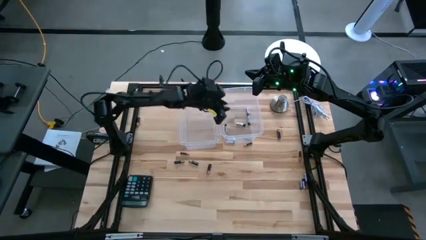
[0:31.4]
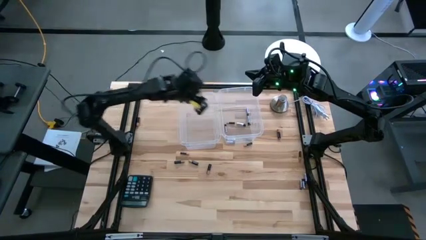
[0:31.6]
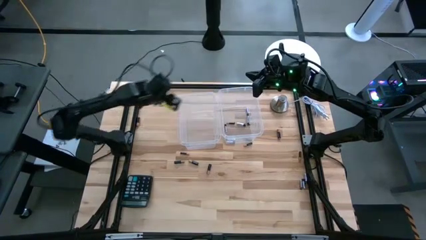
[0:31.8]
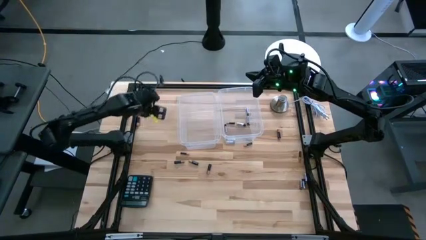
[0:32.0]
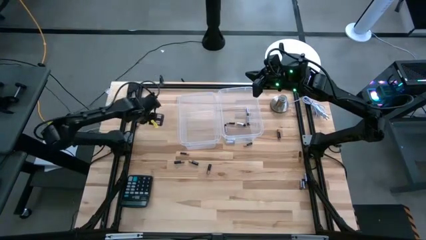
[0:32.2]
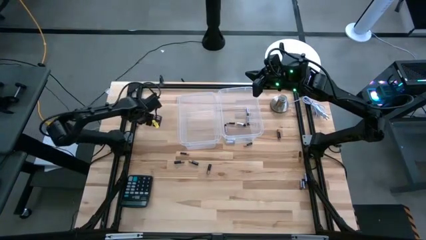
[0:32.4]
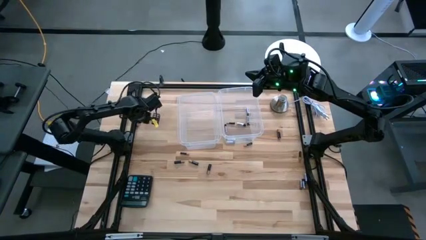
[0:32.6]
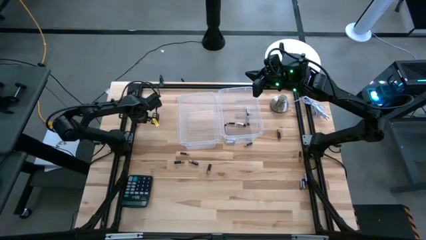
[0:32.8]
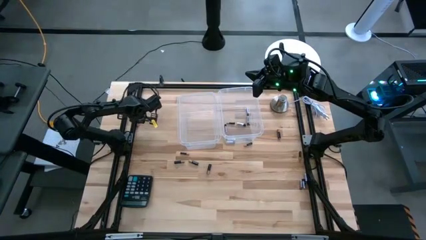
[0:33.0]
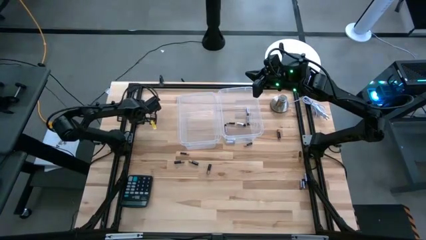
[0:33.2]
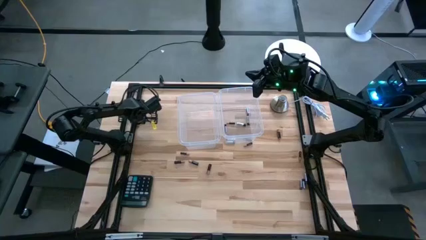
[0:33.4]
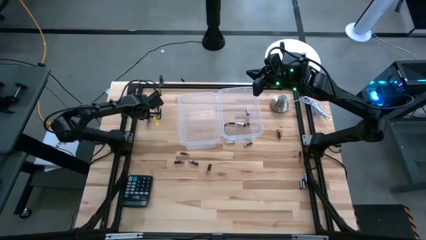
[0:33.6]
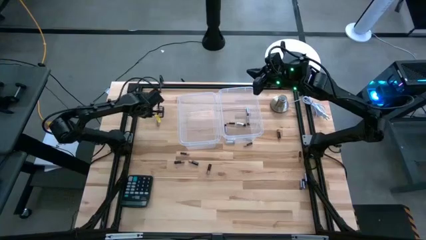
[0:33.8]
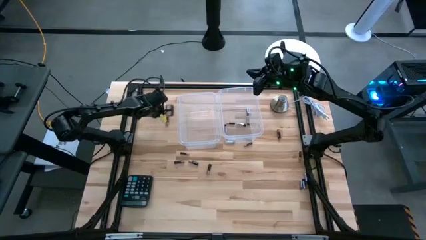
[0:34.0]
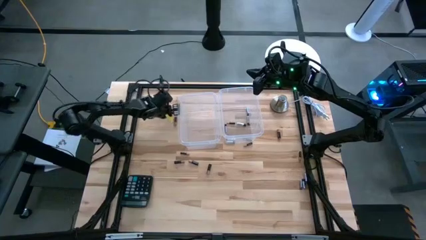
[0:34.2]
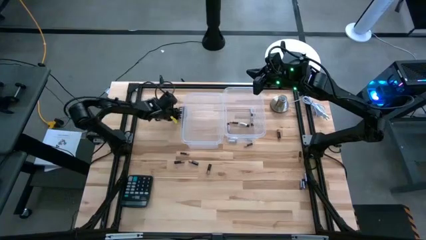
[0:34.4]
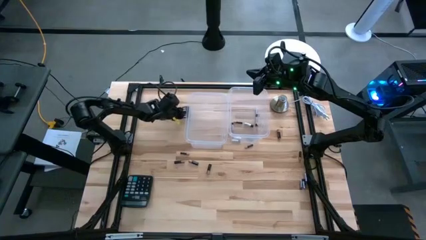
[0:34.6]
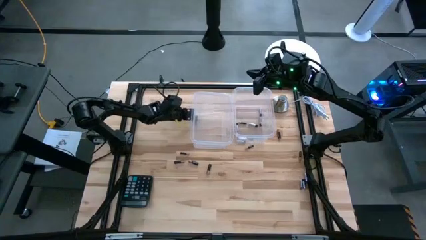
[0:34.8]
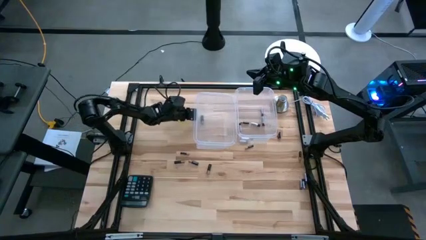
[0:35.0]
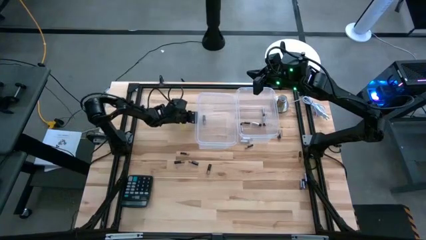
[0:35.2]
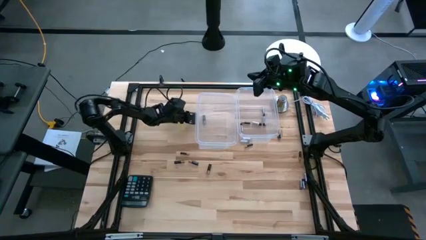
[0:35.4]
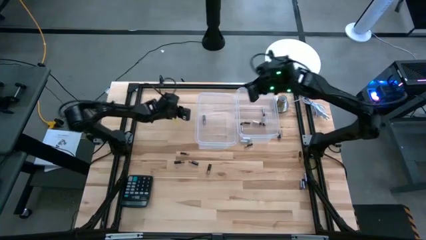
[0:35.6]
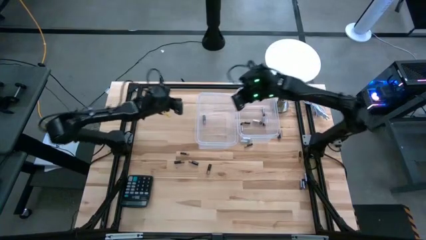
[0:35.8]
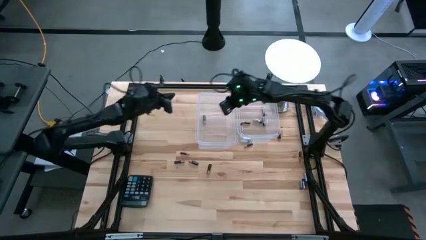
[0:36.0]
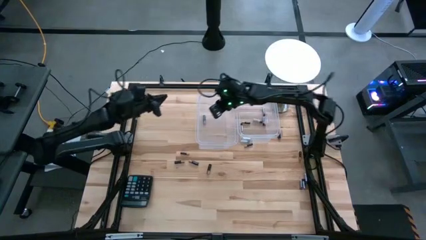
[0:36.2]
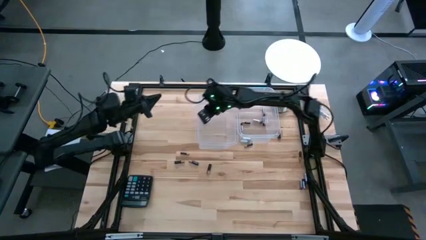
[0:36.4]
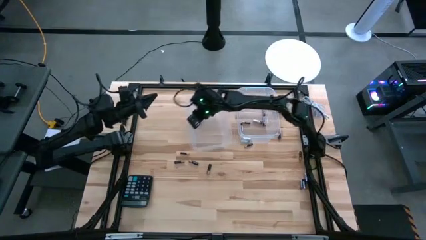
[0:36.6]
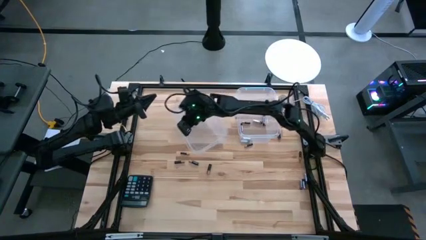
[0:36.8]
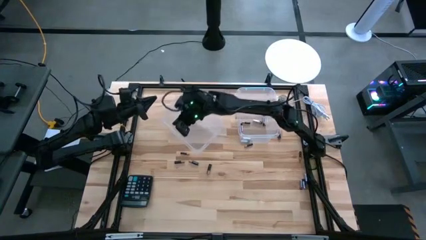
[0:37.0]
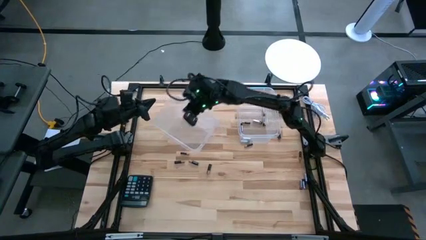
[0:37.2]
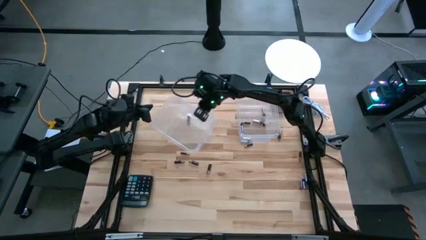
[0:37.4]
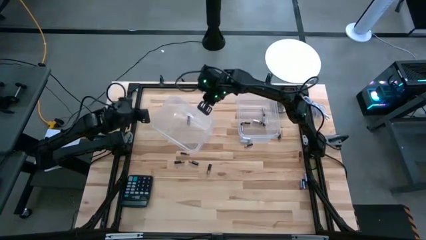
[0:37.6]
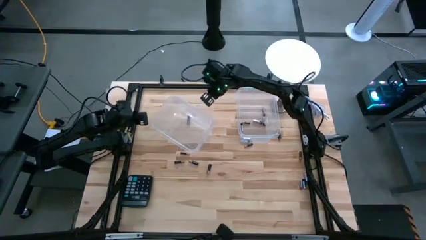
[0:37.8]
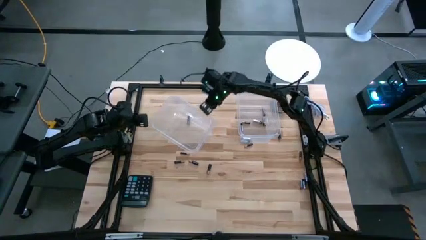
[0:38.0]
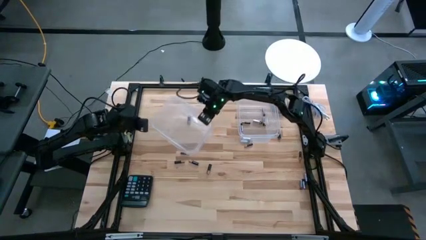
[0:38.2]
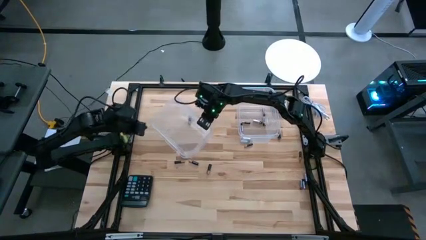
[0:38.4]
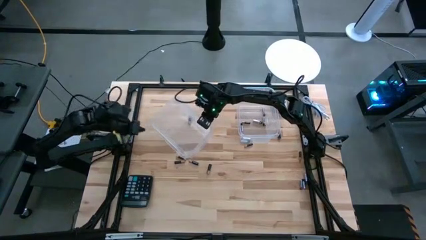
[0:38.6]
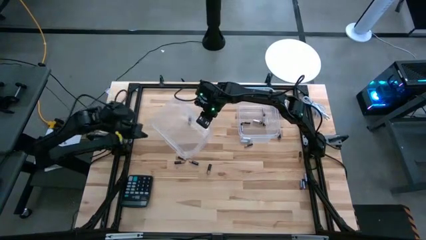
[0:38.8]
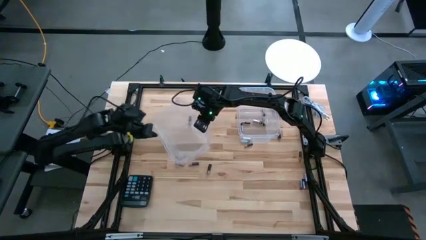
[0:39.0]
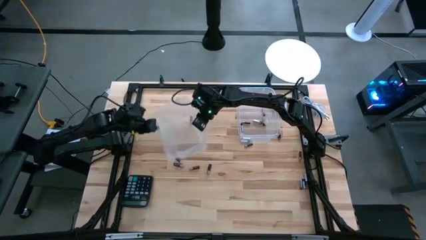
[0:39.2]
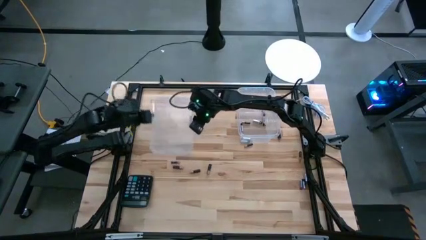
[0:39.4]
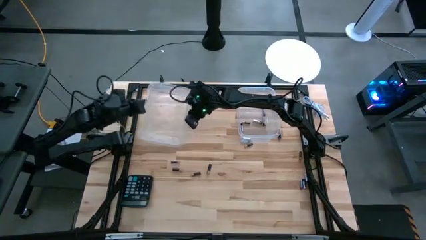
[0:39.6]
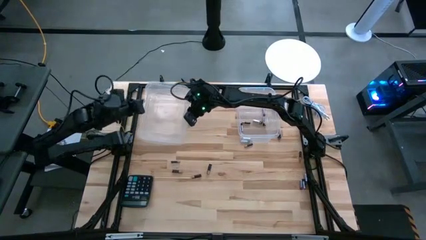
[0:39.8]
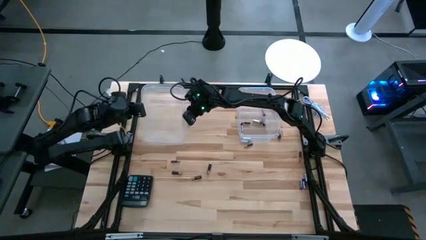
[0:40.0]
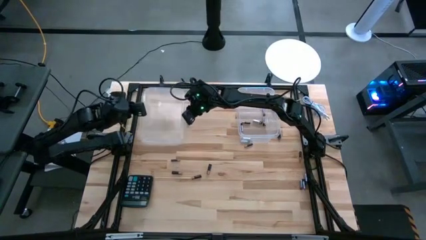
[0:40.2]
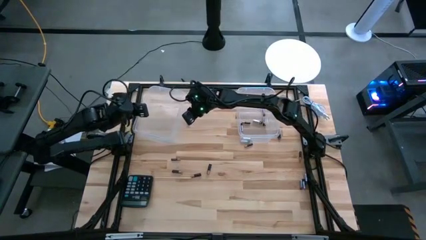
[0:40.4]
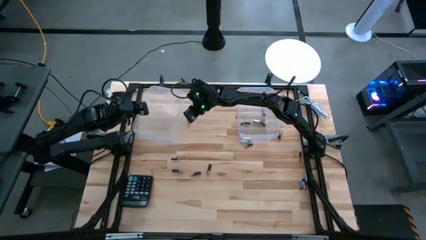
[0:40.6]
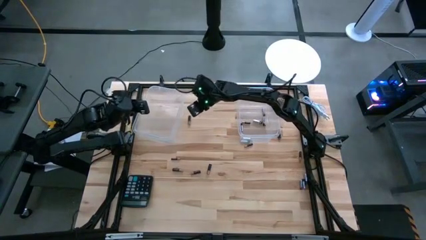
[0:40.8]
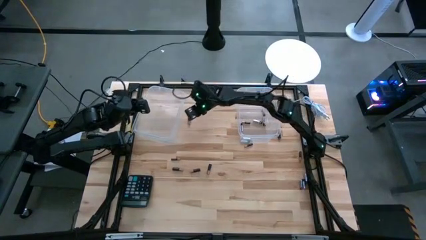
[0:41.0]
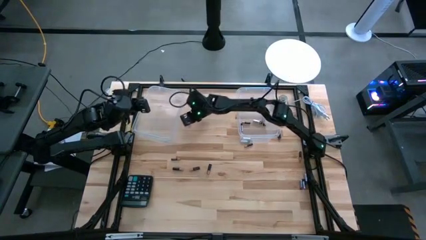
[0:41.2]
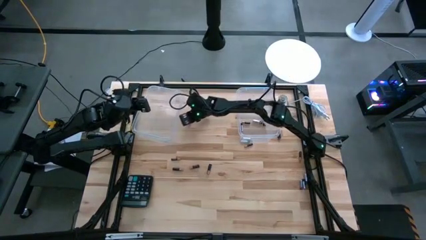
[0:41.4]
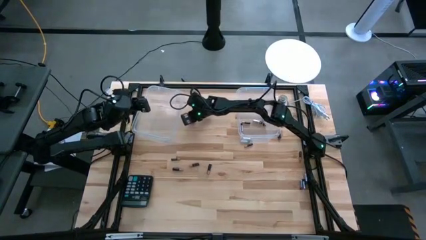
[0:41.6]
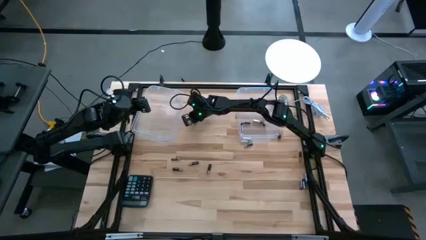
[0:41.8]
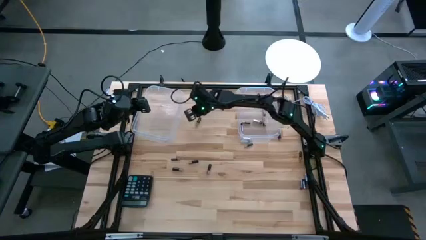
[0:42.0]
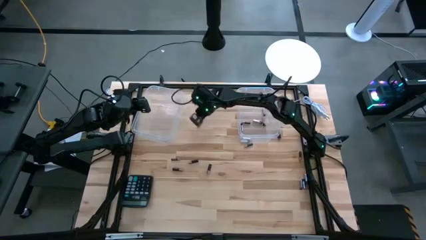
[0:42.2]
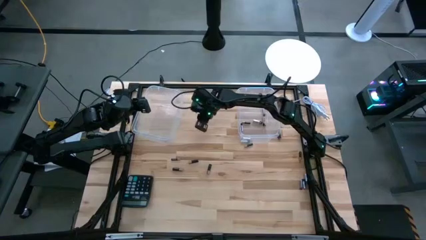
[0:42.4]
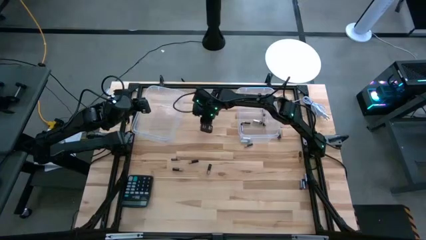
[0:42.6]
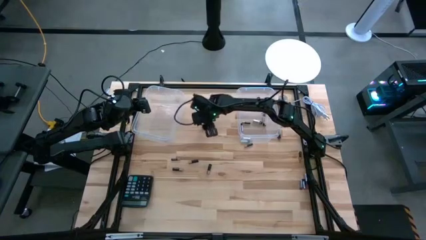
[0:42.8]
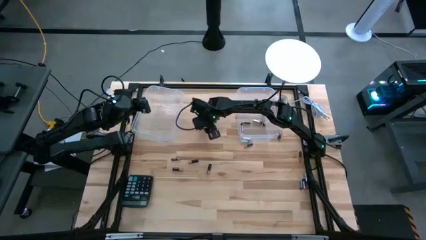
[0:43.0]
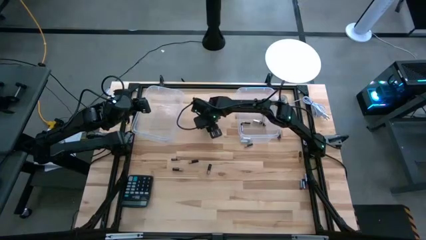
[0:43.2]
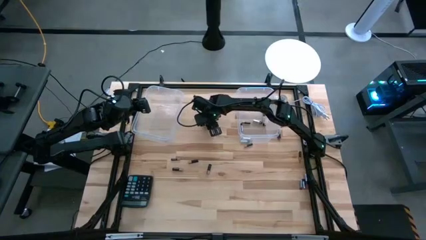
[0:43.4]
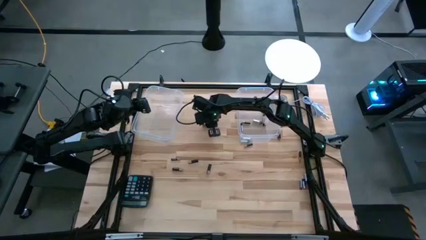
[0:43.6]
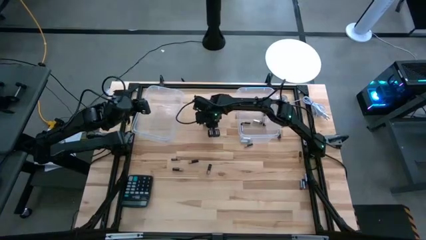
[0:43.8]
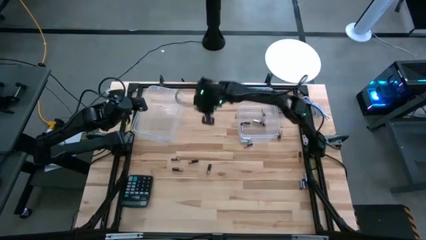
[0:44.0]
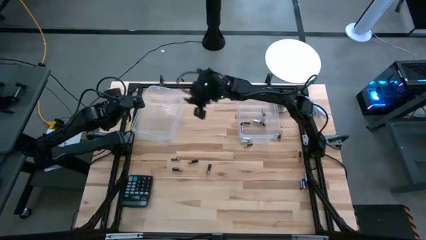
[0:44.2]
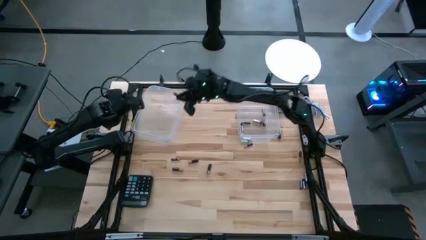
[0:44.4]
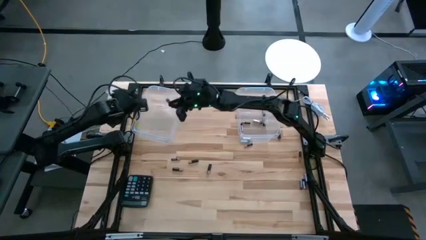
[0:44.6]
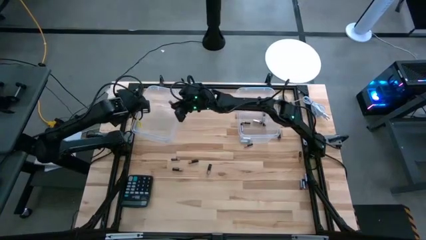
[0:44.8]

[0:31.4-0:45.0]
Task: Sort batteries
Put black battery into the left transparent bin
